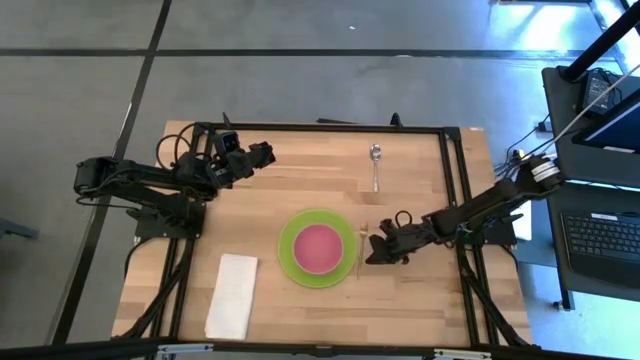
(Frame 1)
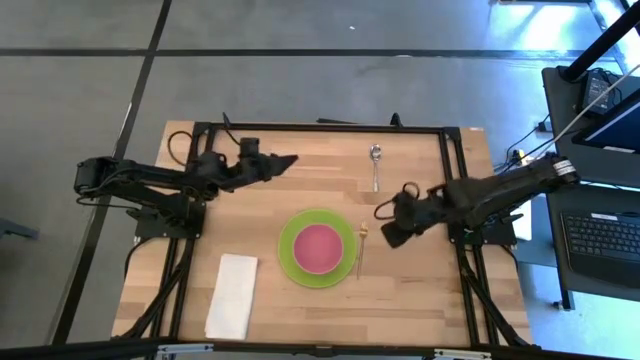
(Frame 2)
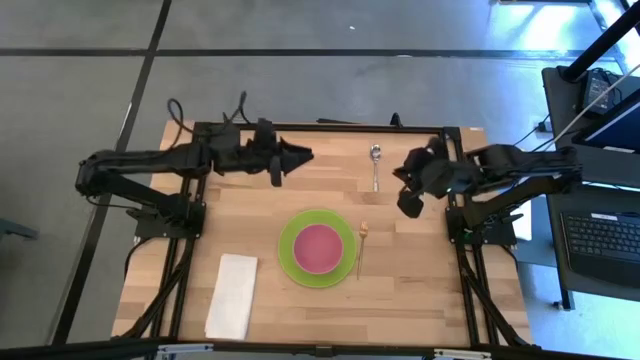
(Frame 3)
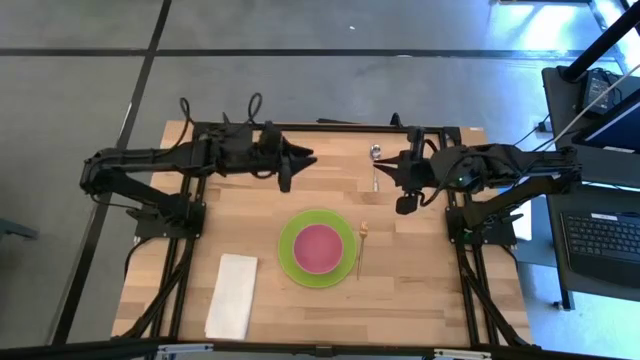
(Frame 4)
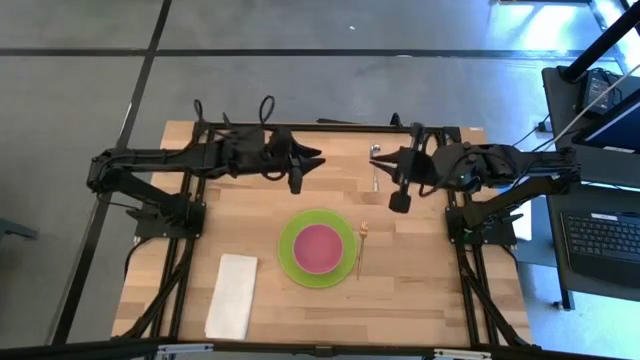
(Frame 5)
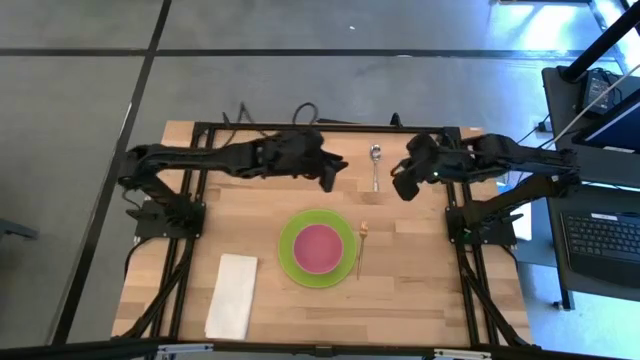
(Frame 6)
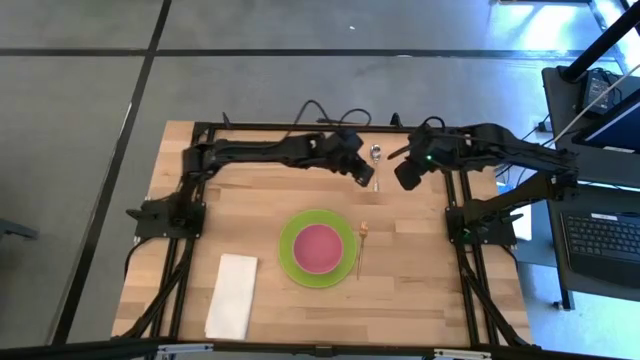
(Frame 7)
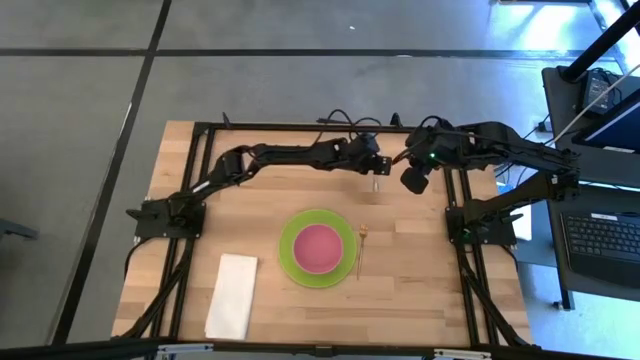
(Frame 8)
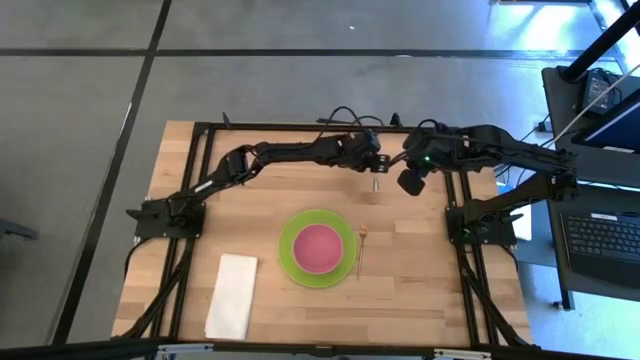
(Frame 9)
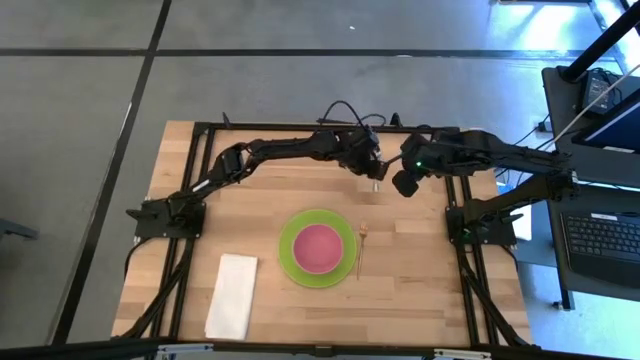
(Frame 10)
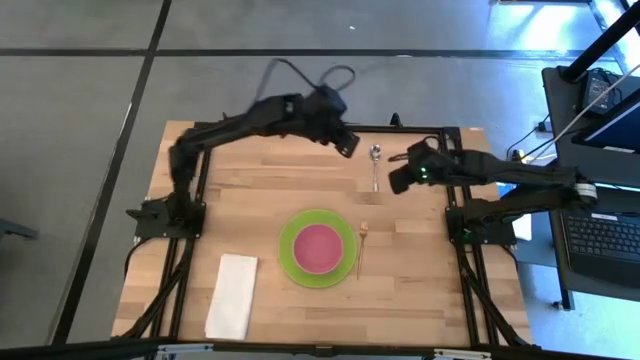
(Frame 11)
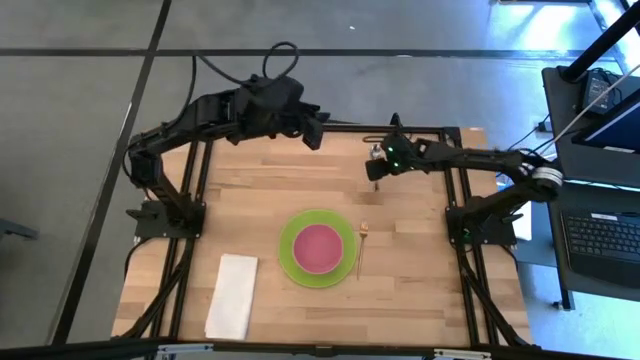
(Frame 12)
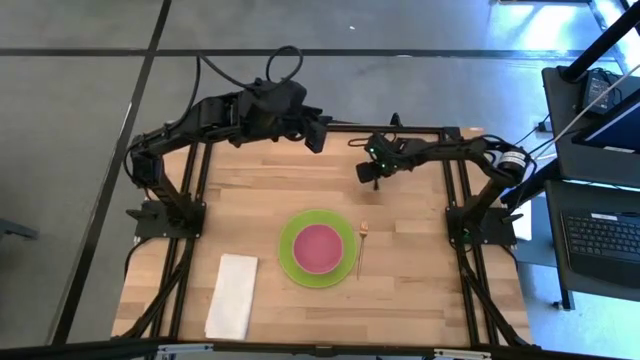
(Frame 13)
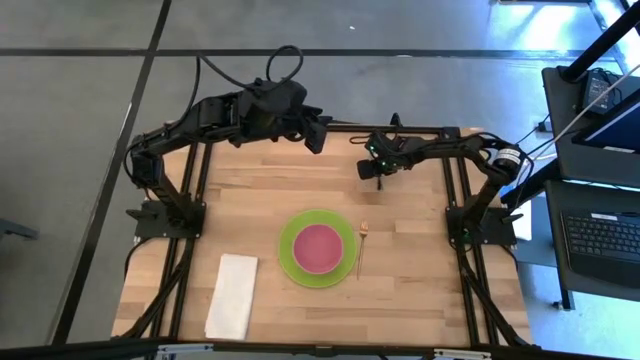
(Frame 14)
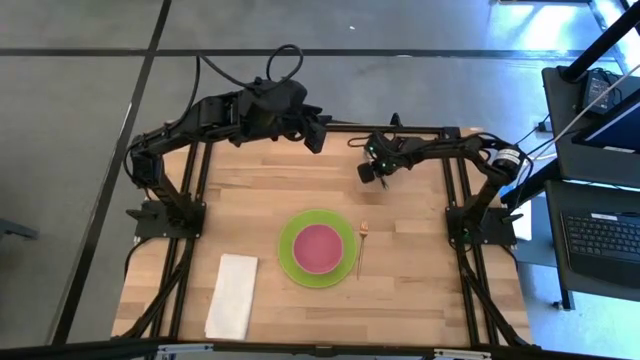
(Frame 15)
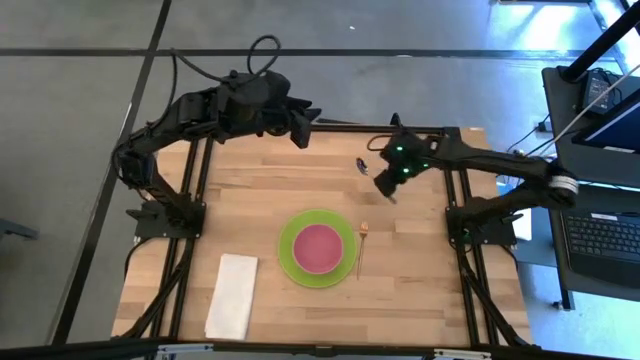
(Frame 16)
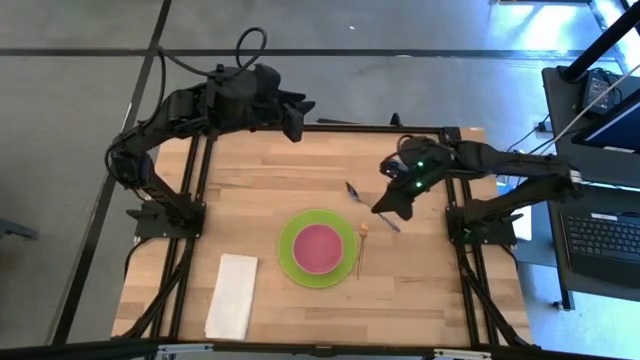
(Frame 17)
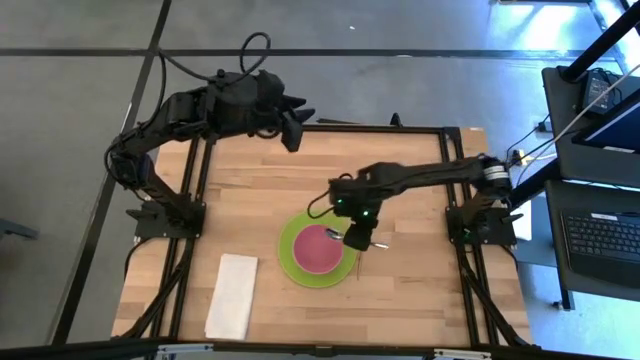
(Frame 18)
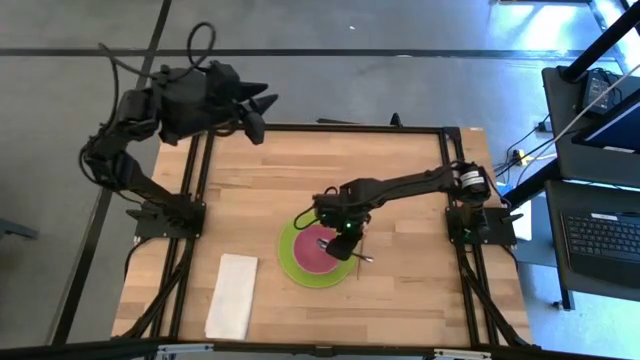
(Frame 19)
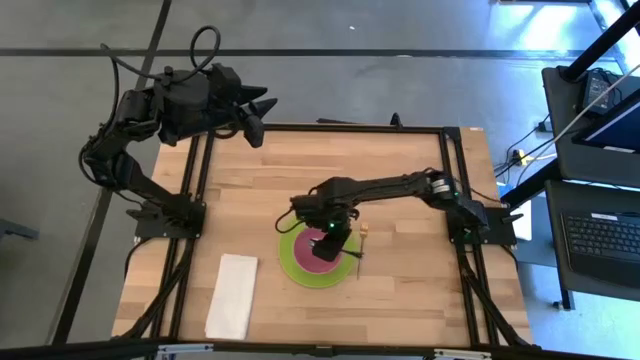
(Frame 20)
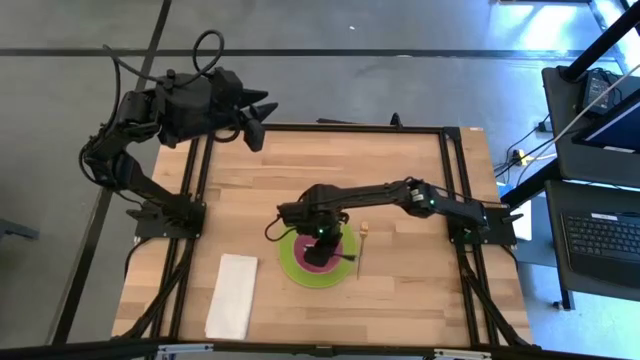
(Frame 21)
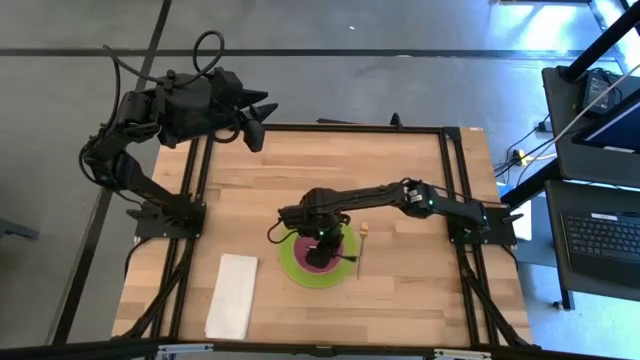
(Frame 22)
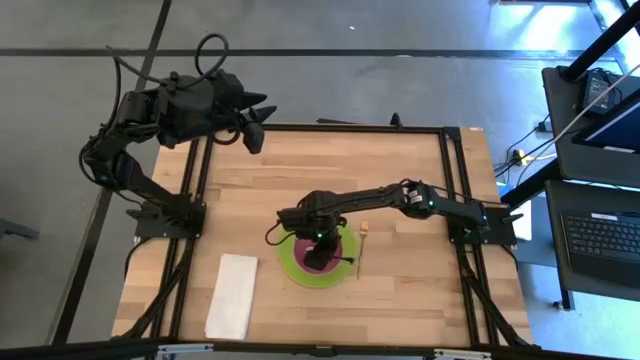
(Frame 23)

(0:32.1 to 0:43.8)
Task: Set table place
Put the silver spoon into the pink bowl

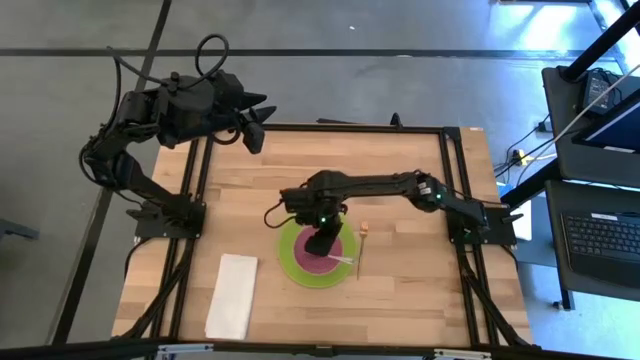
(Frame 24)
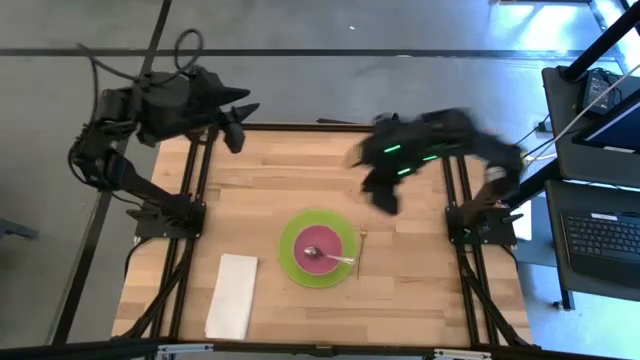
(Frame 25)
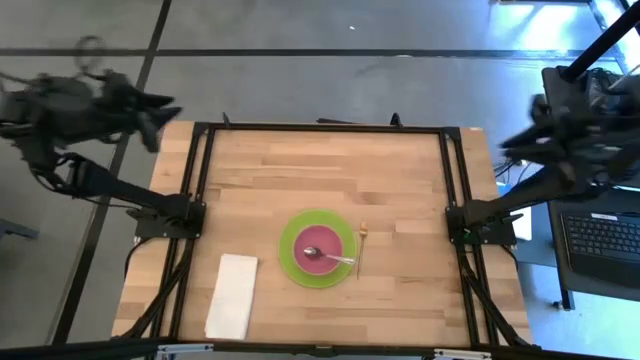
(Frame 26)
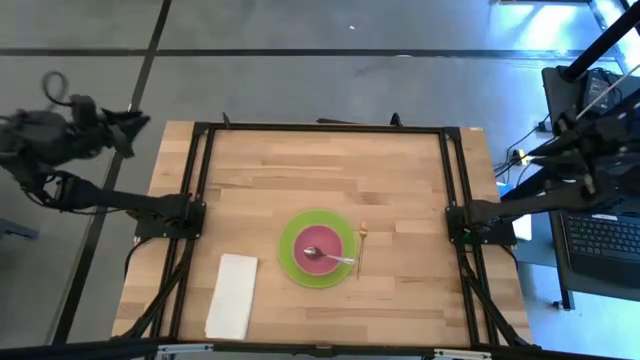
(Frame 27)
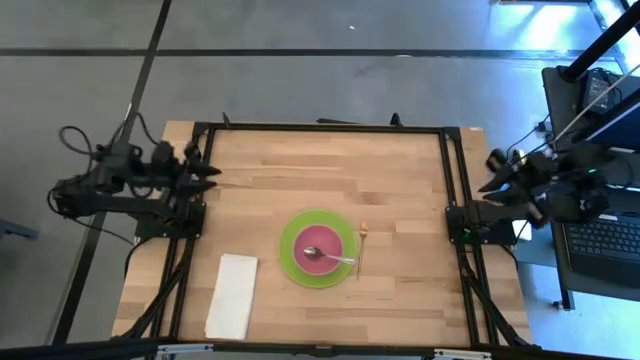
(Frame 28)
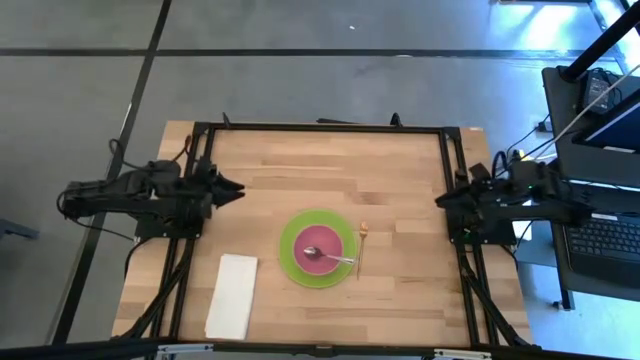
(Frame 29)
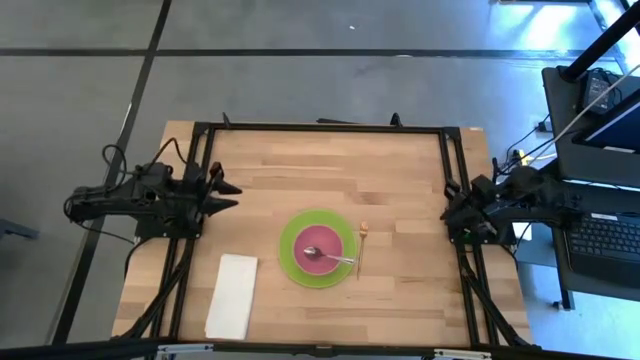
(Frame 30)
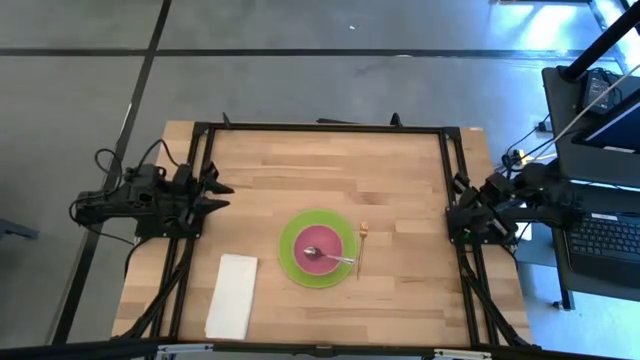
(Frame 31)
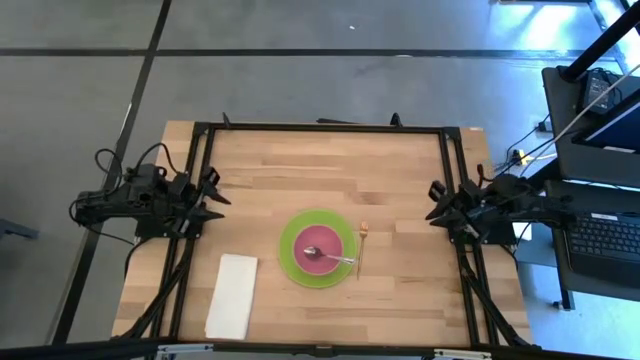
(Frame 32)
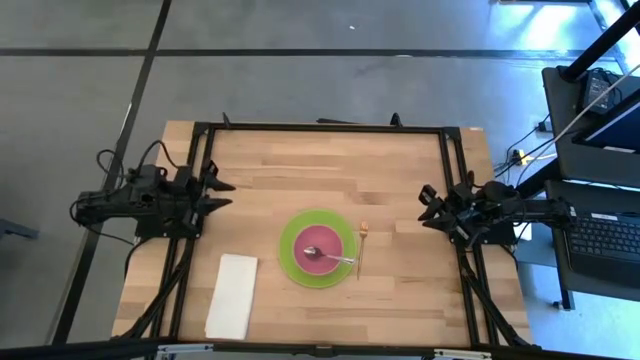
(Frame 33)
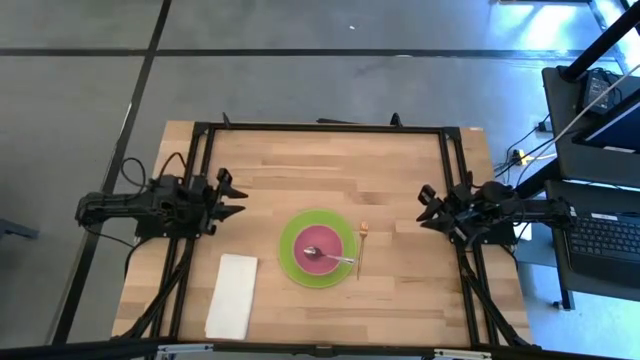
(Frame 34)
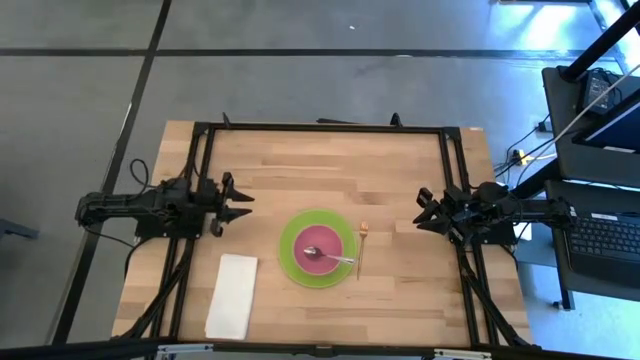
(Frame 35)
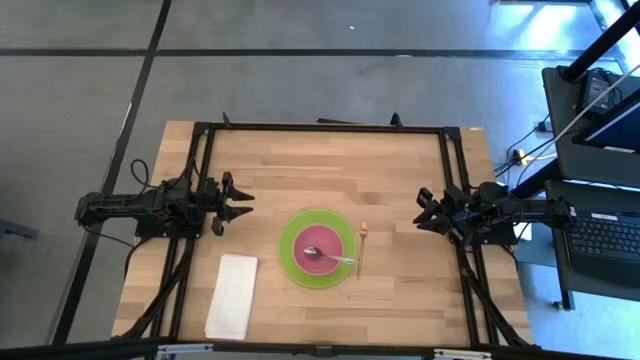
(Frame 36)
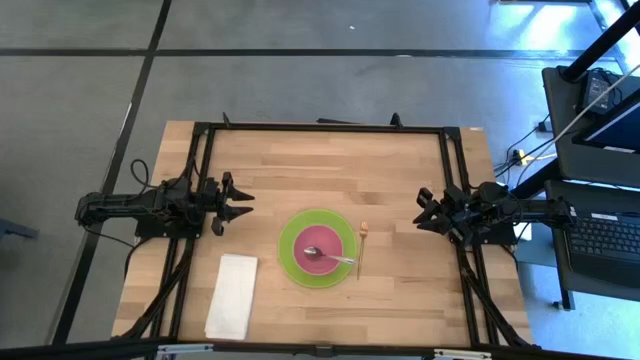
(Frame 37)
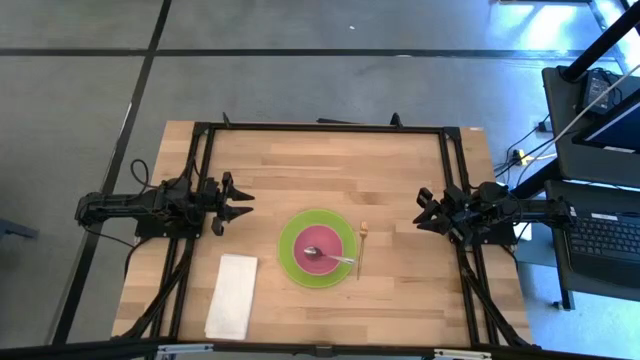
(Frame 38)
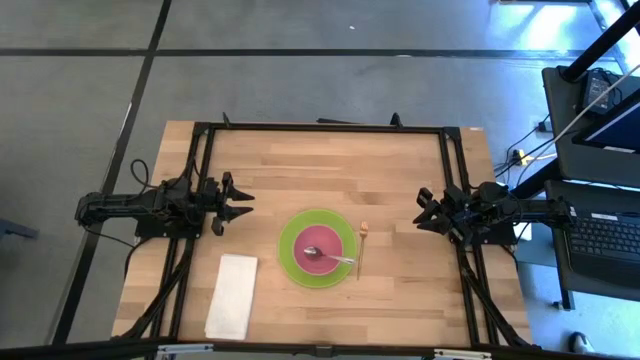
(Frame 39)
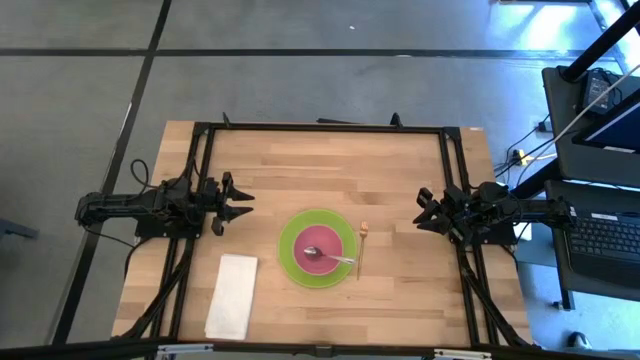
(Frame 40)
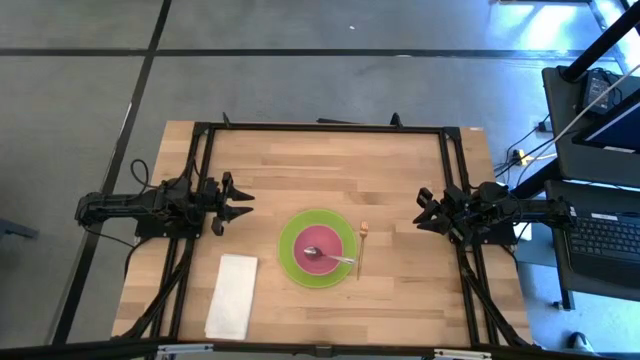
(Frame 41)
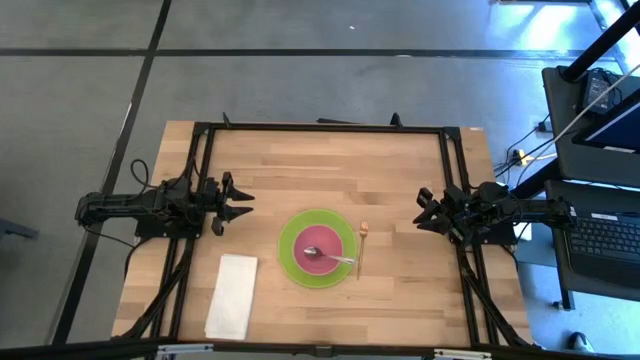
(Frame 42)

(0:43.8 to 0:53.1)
Return to Home Position

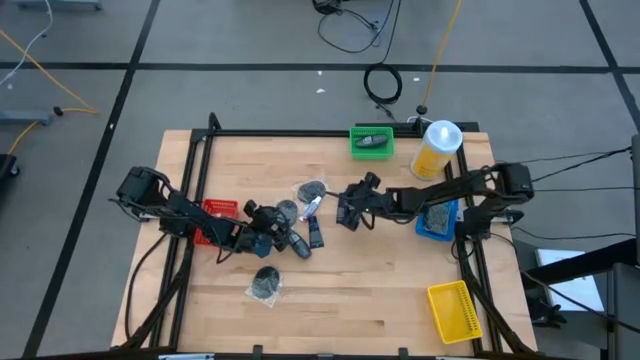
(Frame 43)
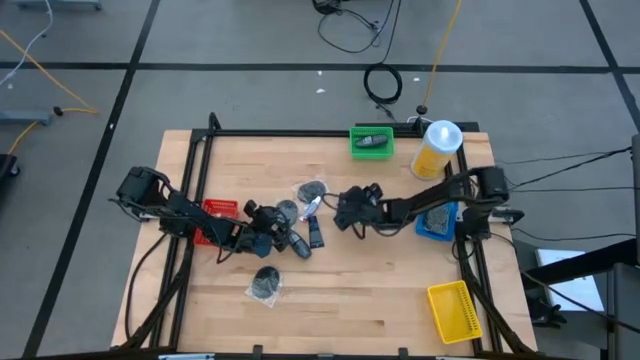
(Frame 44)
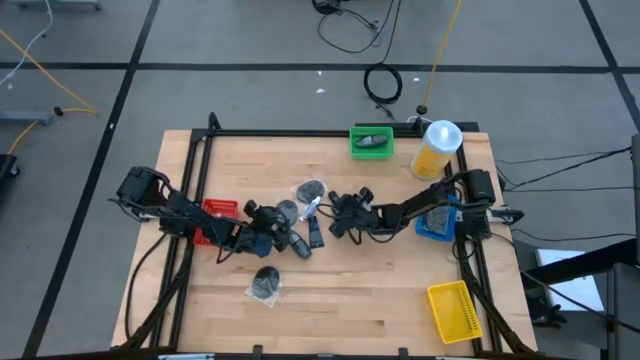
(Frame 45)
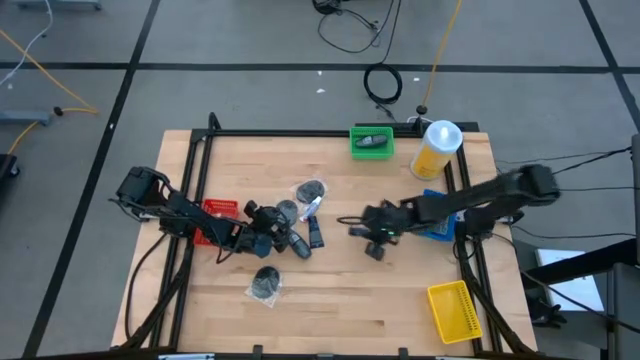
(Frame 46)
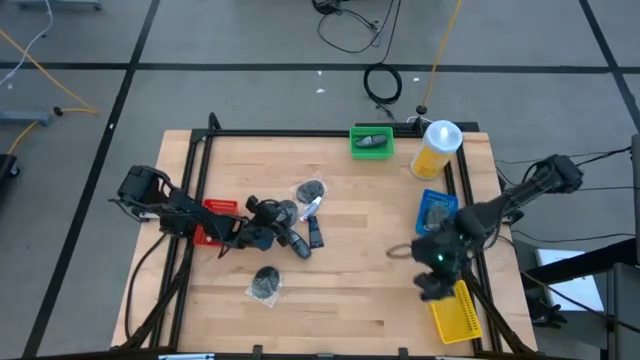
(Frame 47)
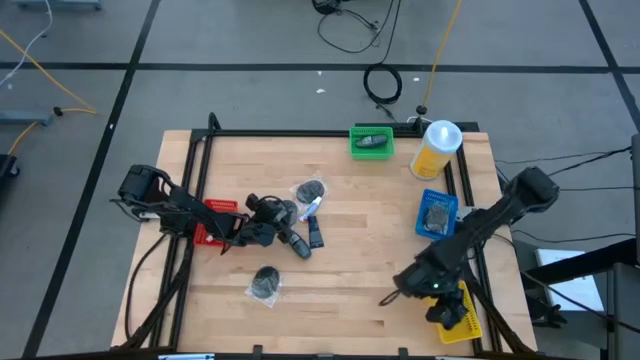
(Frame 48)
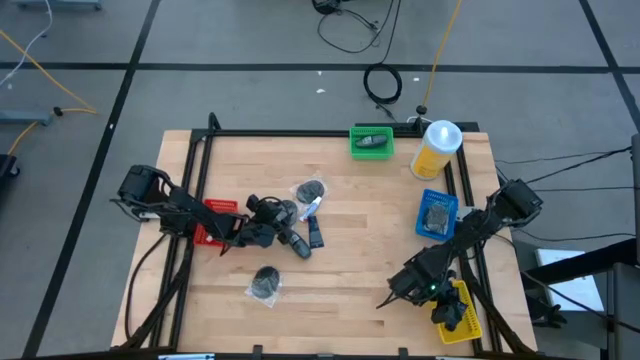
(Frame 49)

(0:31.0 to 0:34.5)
Task: Pick & Place Travel size toiletries
Put the blue shave cream into the yellow bin
